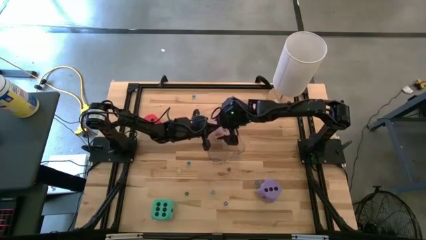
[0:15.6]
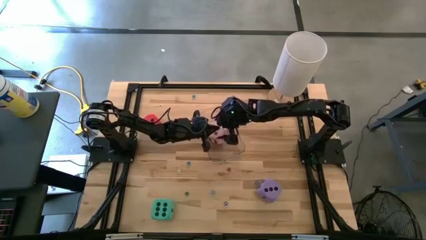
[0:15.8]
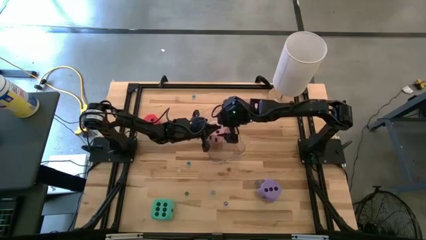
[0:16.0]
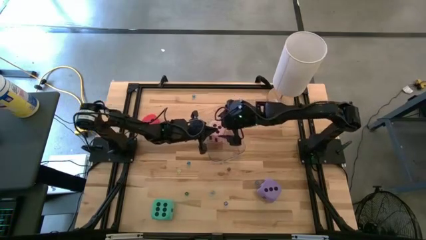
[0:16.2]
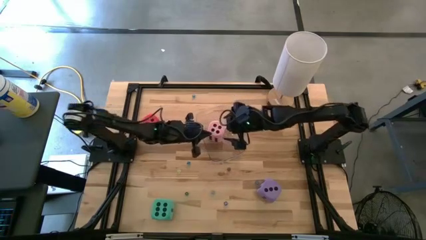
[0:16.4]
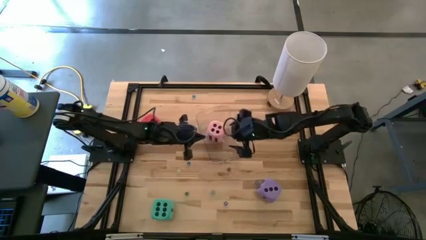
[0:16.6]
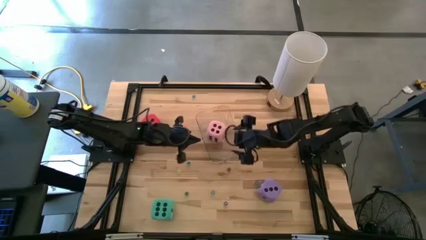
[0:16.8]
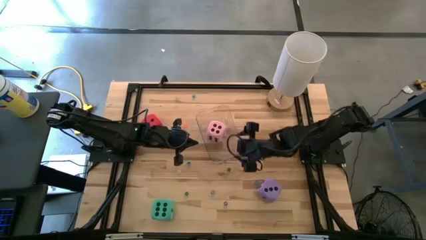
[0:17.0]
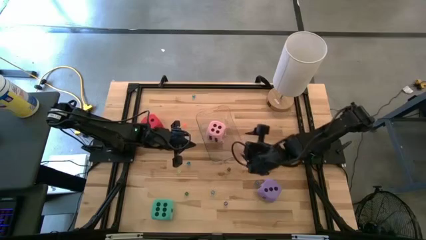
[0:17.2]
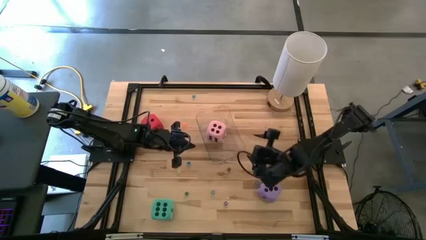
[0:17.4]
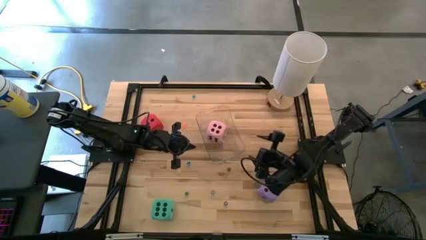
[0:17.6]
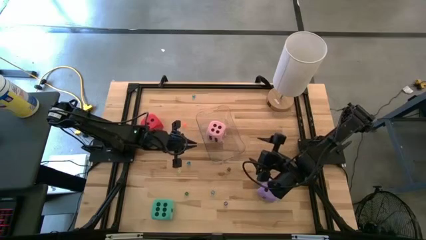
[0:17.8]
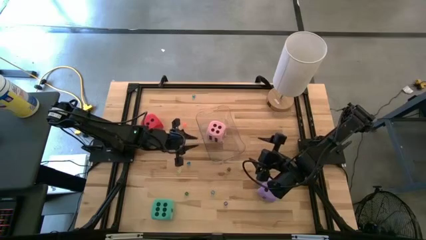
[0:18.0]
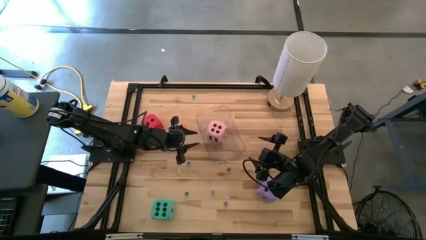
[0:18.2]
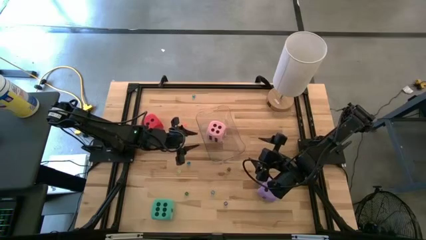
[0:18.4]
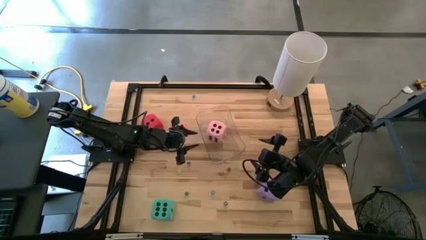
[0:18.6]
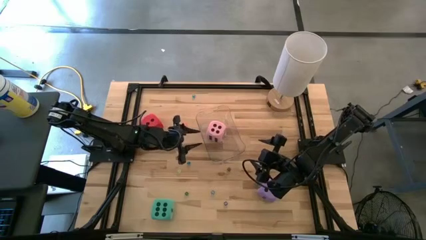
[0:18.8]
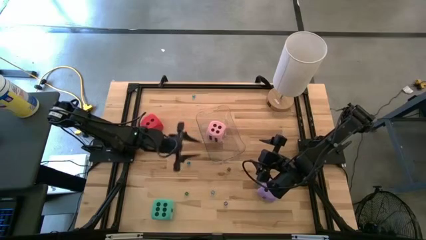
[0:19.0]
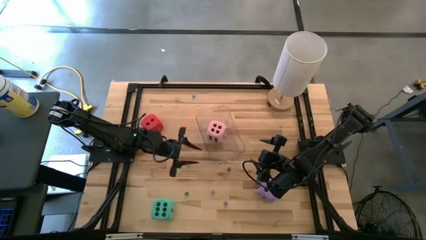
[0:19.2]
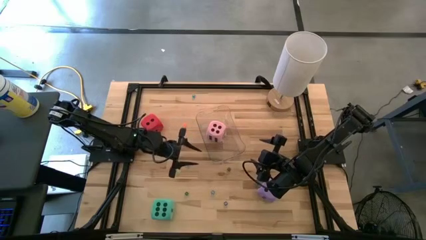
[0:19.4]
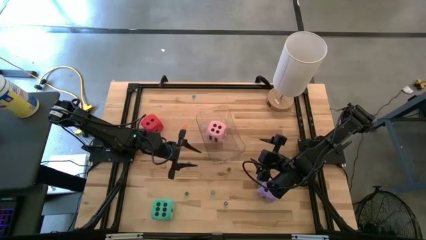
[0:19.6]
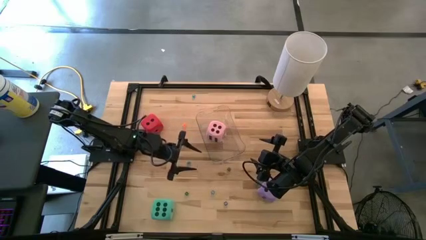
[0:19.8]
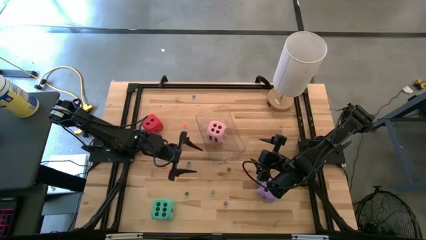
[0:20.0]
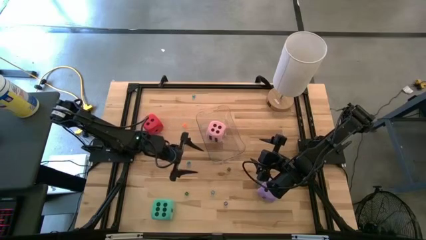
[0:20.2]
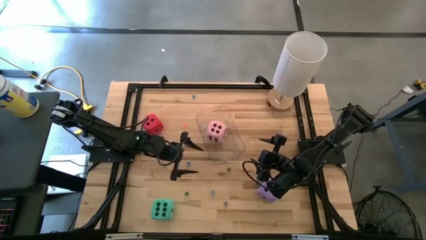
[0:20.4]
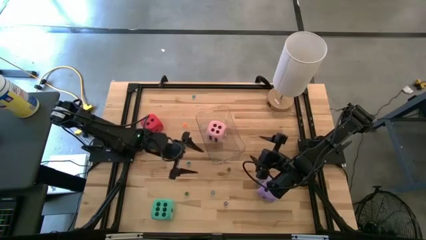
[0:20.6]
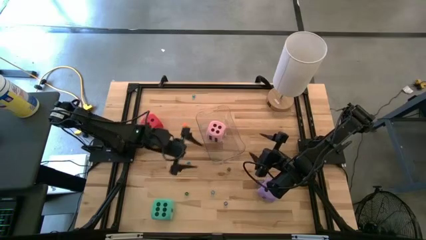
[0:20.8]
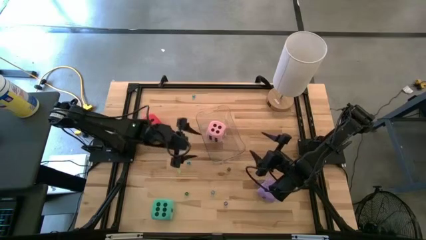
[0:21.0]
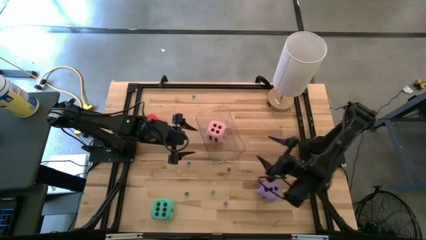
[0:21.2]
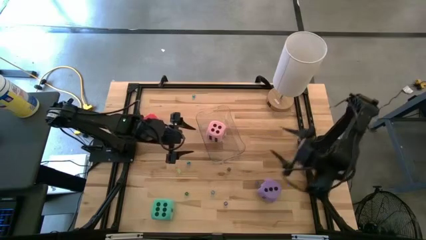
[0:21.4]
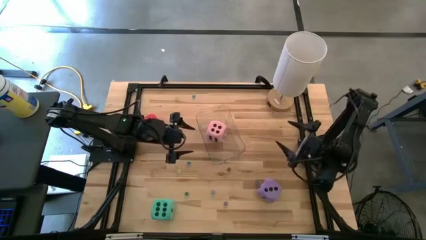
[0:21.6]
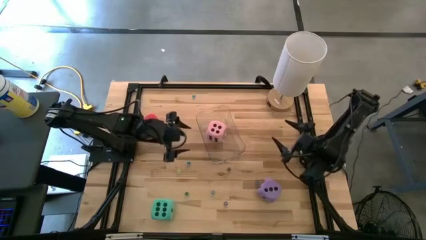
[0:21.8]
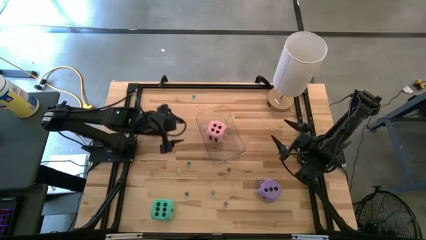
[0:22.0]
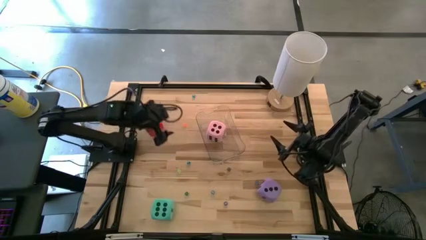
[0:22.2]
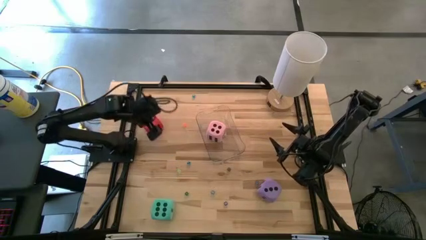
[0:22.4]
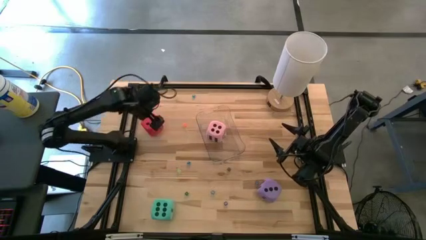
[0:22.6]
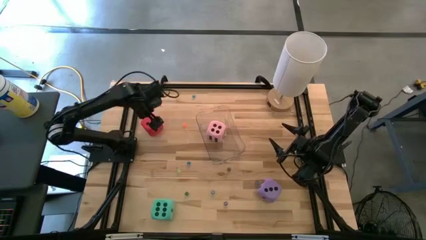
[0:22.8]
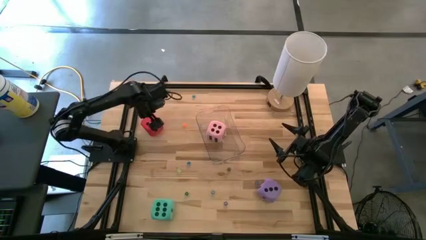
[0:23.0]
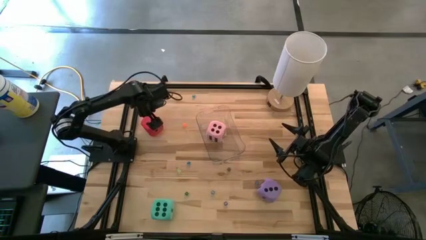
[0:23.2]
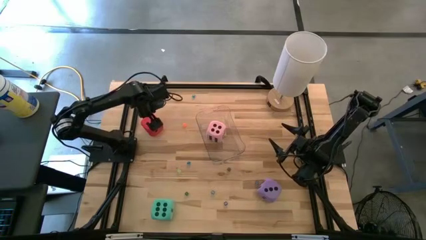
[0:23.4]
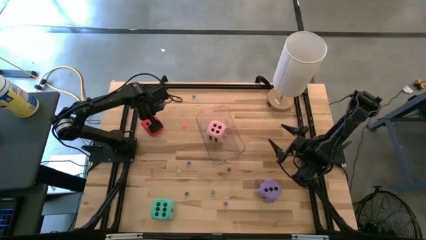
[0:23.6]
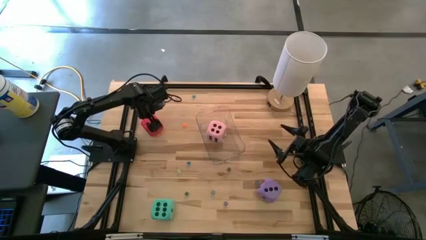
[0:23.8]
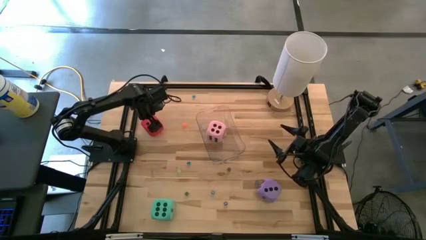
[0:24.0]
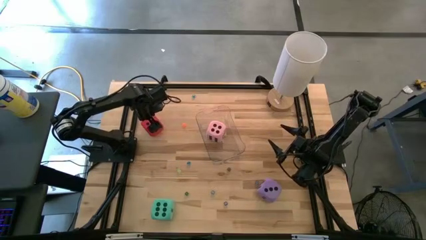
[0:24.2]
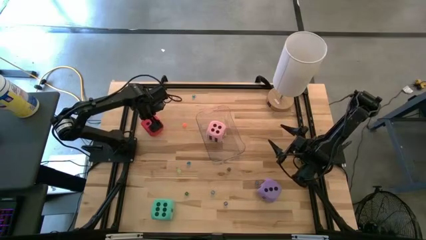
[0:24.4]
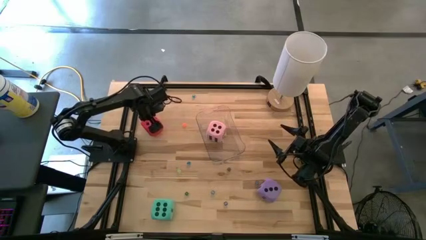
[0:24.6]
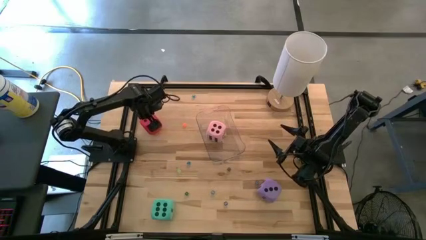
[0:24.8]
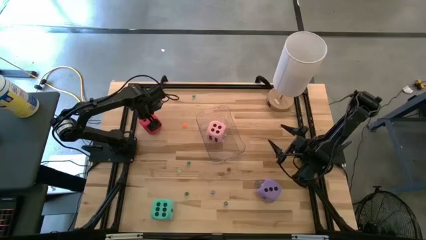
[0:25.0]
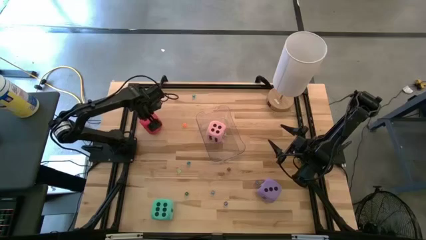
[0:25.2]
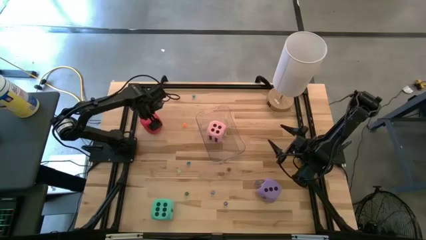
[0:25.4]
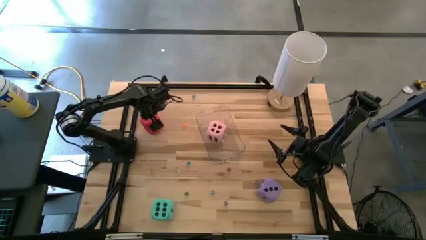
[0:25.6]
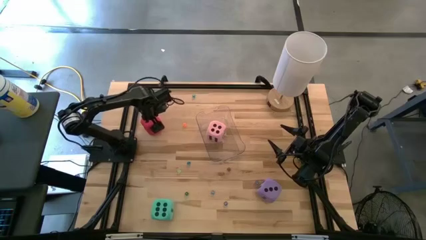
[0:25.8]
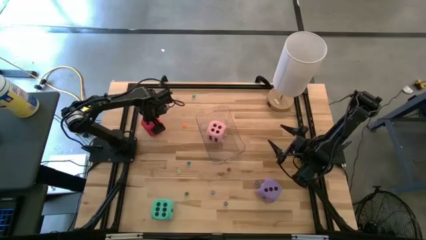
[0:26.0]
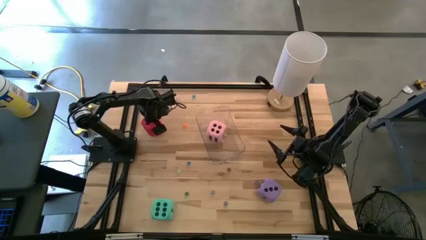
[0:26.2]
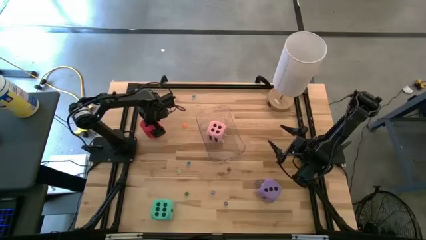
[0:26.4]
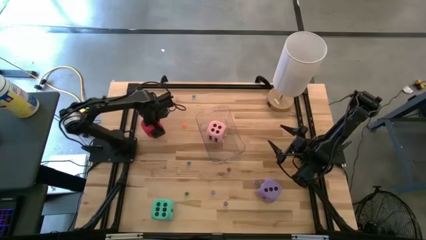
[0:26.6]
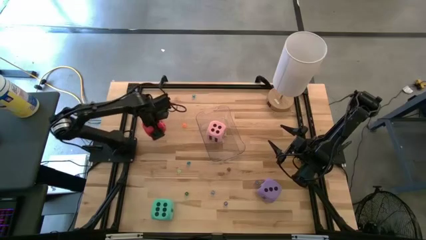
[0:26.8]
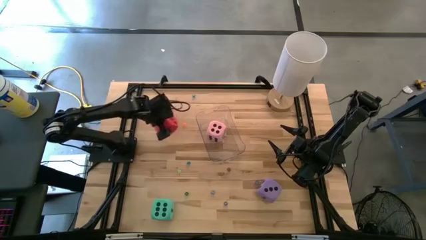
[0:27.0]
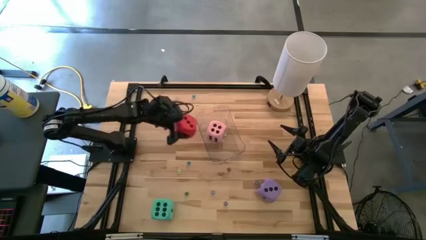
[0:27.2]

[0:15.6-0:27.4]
Task: Pick & Place Dice
Put the large red dice into the transparent bin

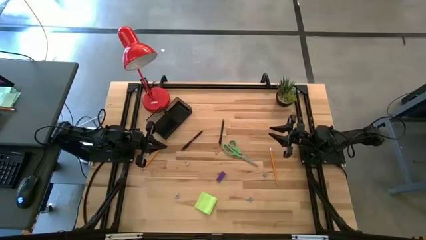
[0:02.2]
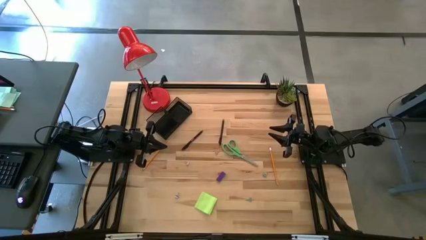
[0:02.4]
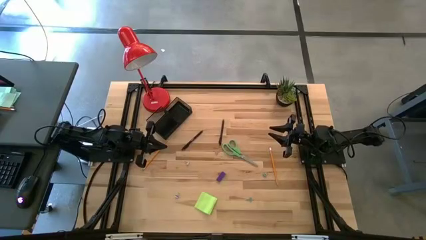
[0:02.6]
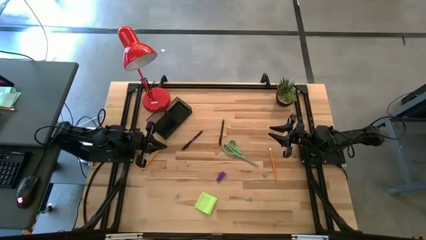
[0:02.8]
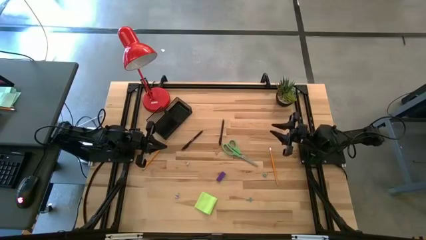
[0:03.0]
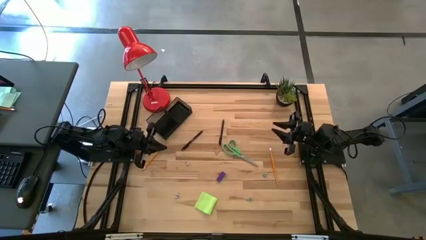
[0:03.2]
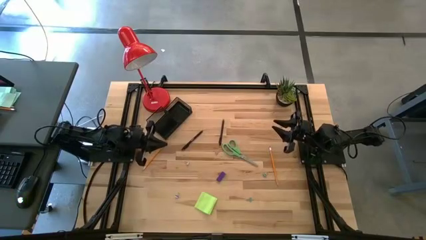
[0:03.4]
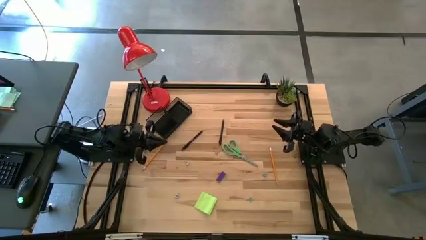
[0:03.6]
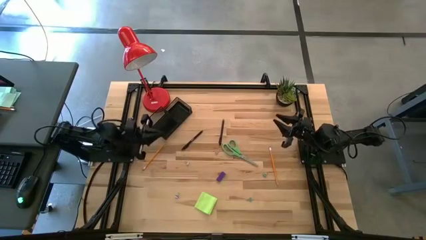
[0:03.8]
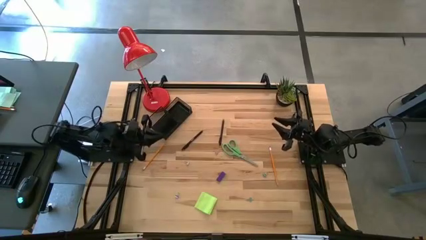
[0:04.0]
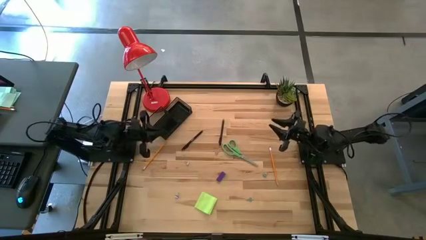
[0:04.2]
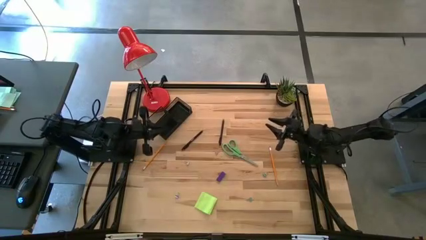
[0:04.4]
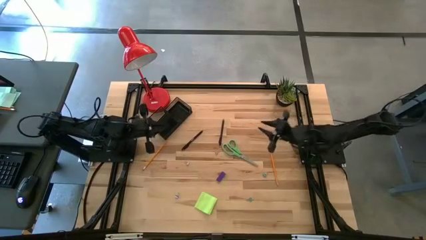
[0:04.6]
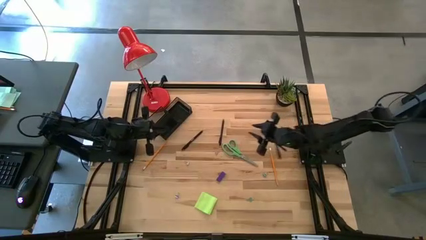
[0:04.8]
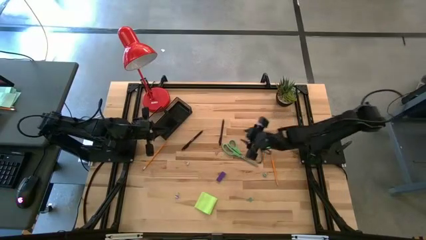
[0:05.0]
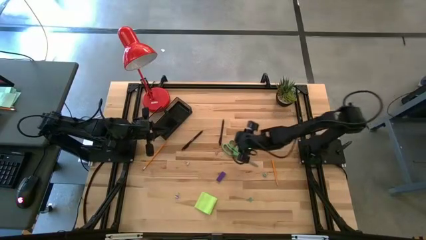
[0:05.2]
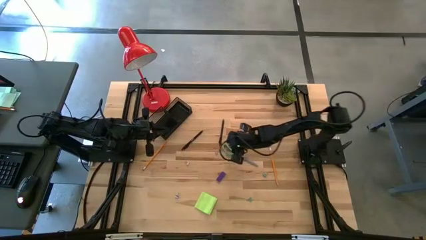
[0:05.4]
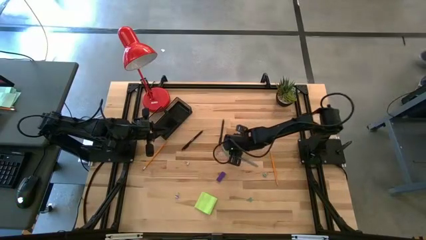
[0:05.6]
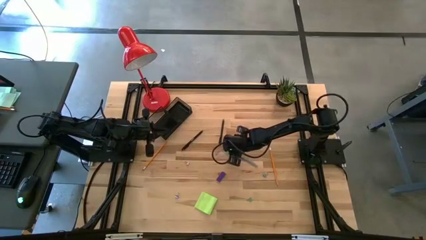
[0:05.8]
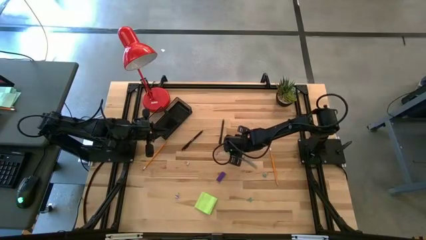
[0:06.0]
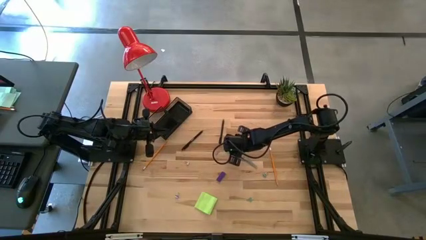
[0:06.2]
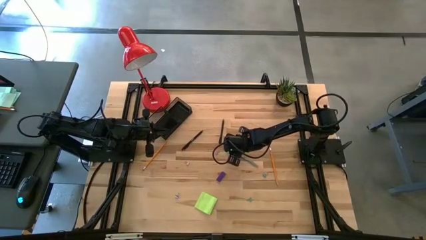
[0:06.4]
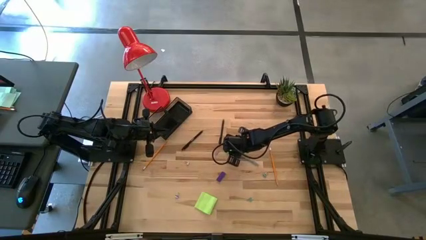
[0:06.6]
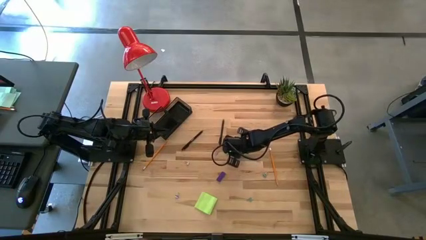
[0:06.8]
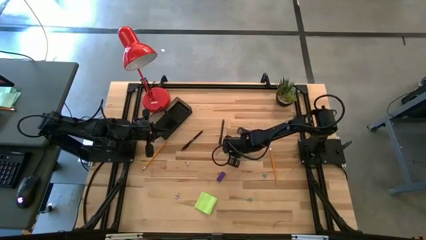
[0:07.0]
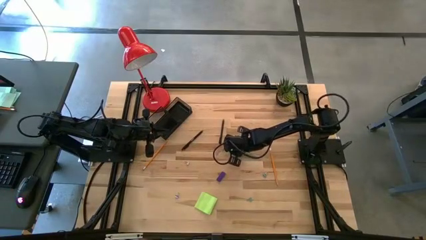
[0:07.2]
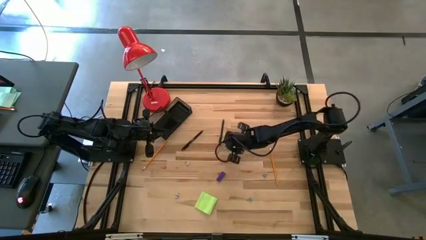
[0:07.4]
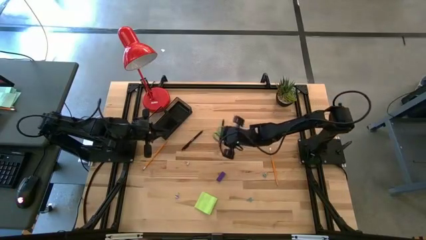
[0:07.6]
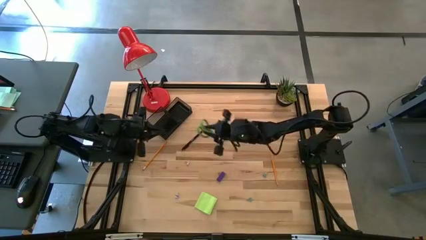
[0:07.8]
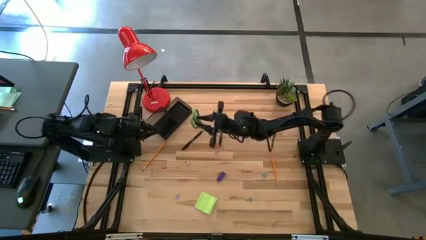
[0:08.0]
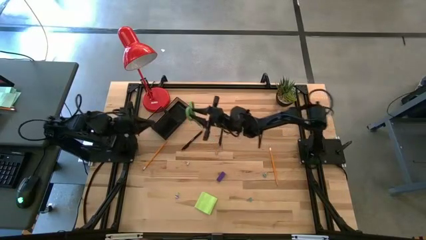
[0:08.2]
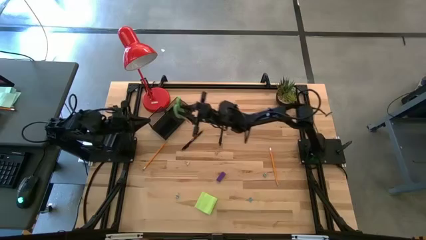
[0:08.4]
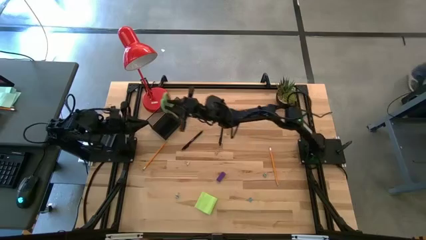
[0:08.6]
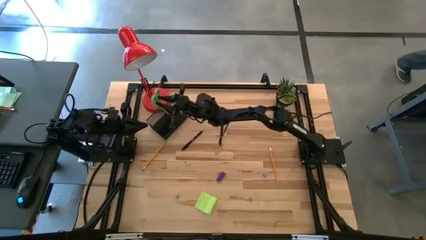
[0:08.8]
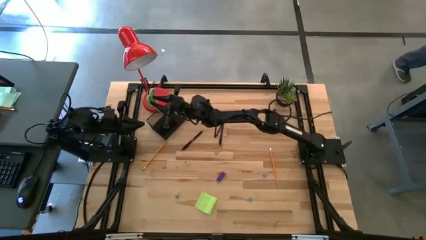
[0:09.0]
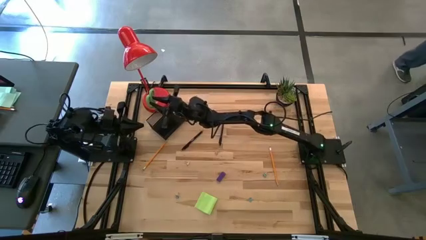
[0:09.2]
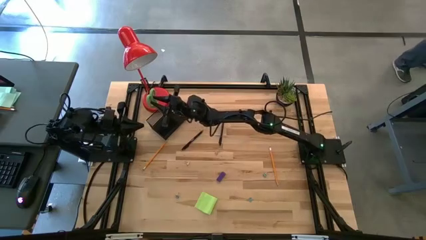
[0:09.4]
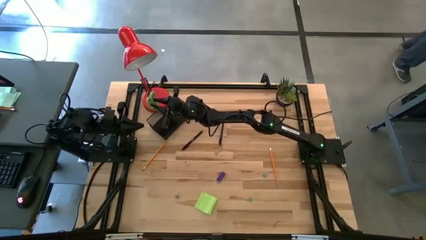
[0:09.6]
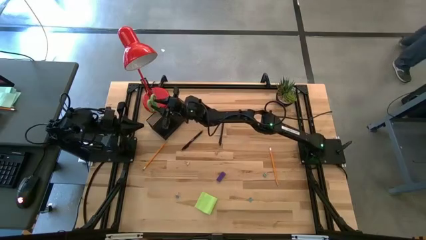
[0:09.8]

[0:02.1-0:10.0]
Task: Pick and place office supplies into organizer
Put the green scissors into the desk organizer
